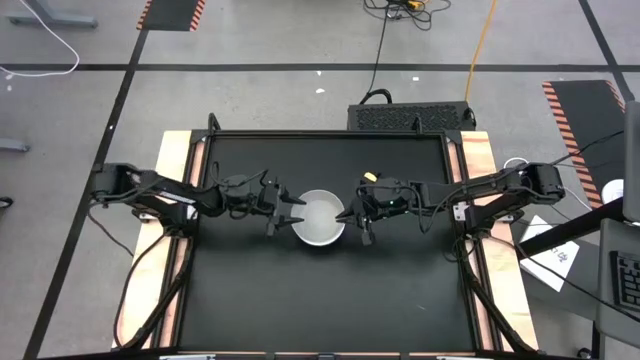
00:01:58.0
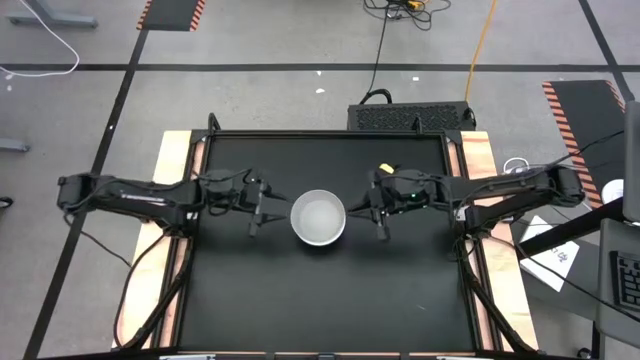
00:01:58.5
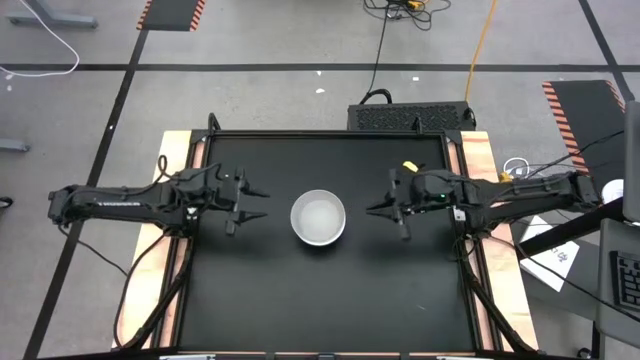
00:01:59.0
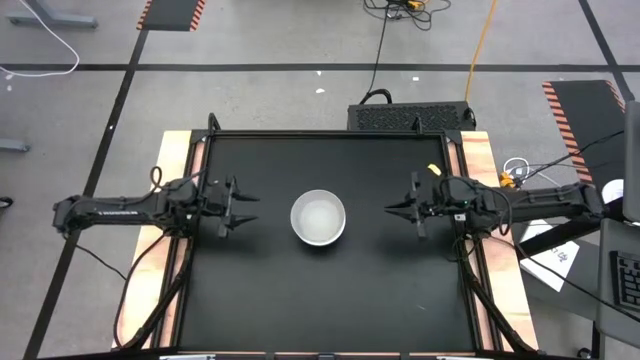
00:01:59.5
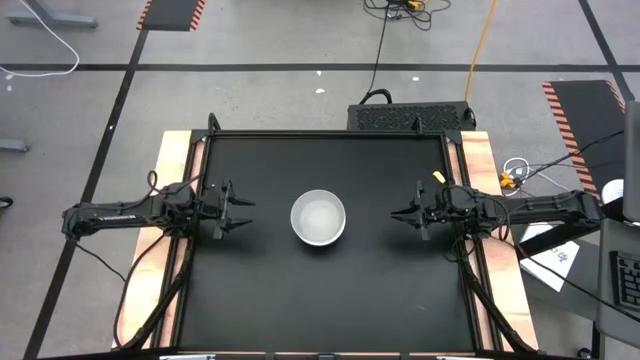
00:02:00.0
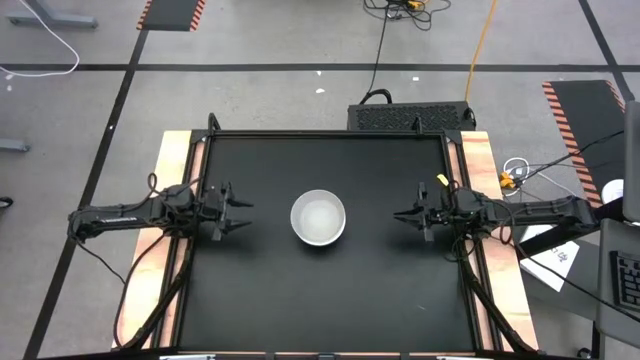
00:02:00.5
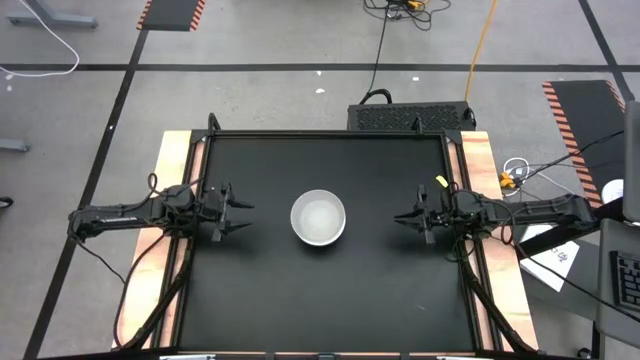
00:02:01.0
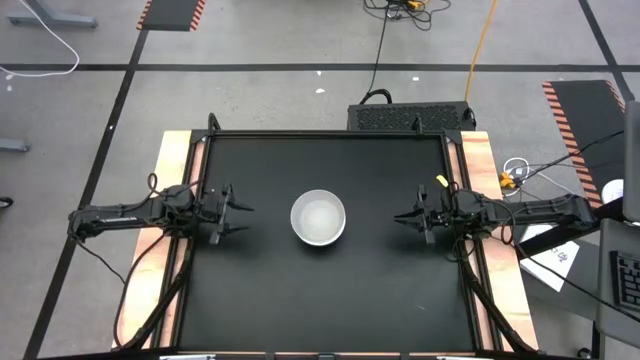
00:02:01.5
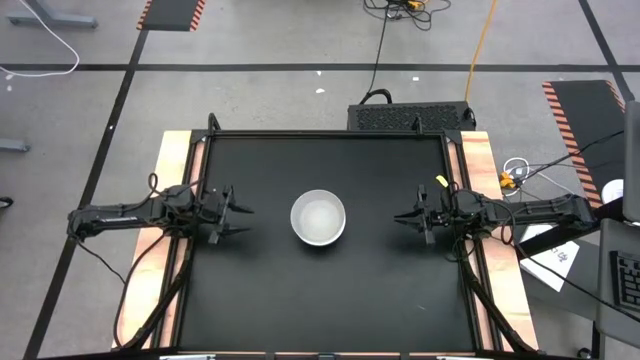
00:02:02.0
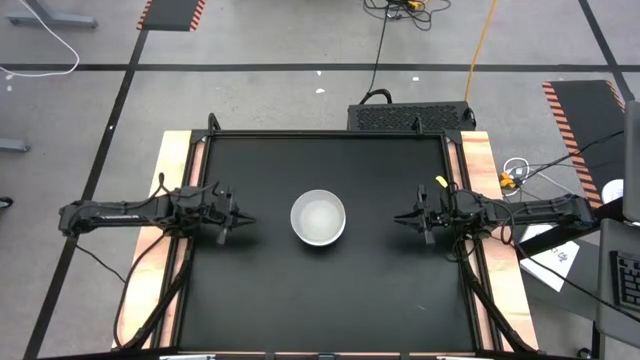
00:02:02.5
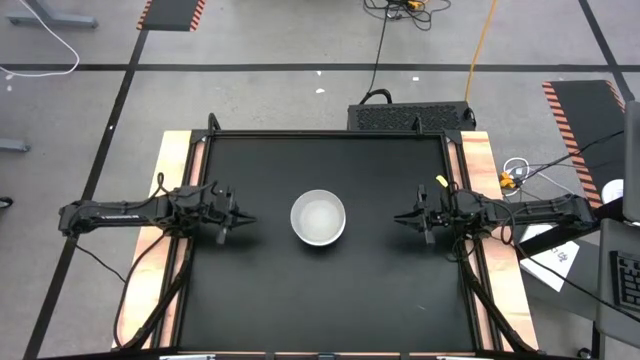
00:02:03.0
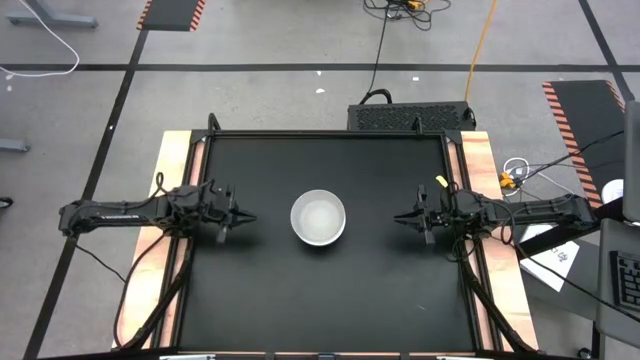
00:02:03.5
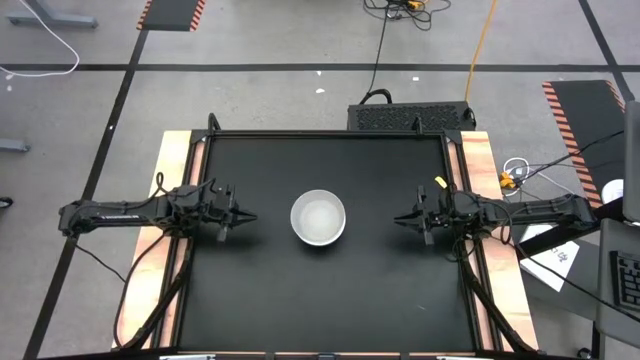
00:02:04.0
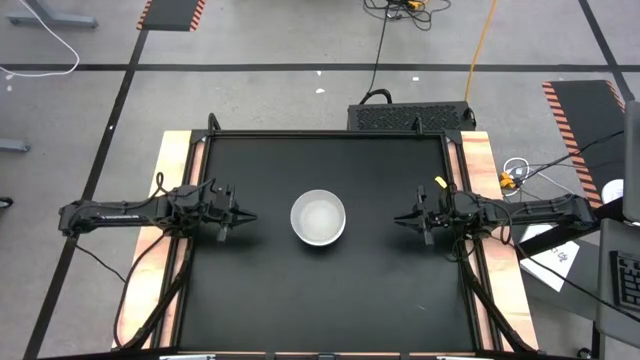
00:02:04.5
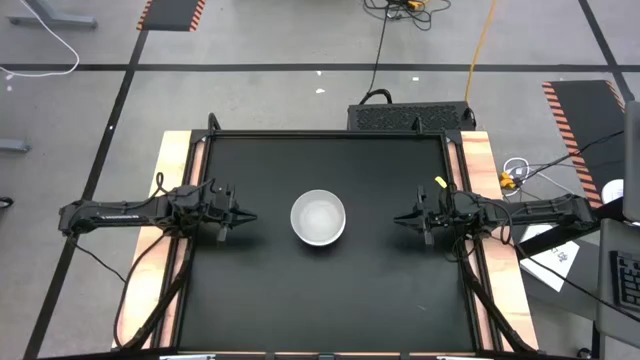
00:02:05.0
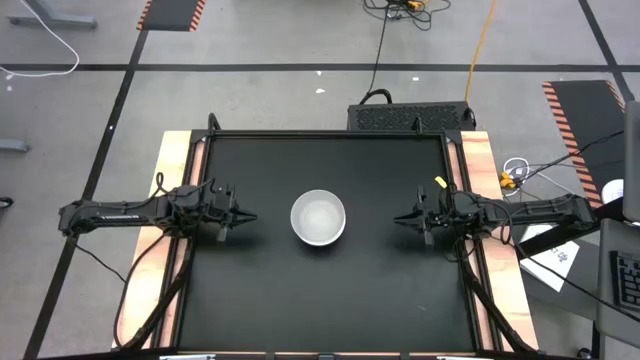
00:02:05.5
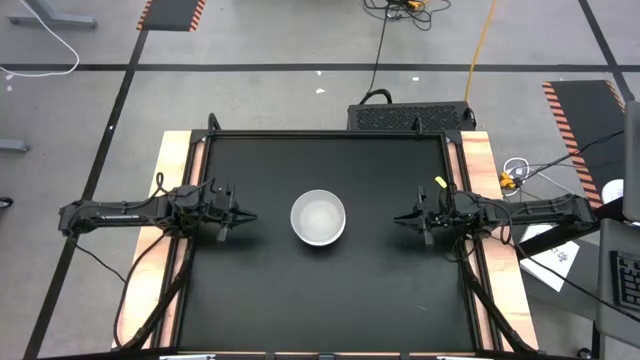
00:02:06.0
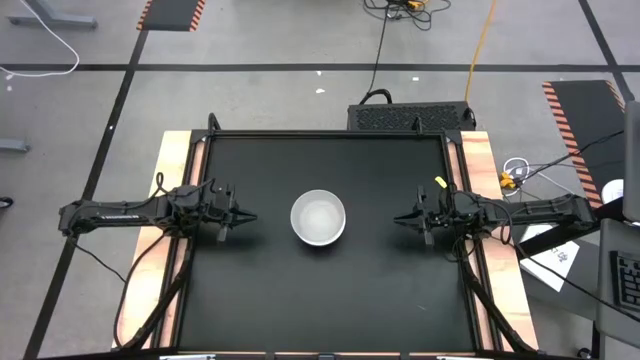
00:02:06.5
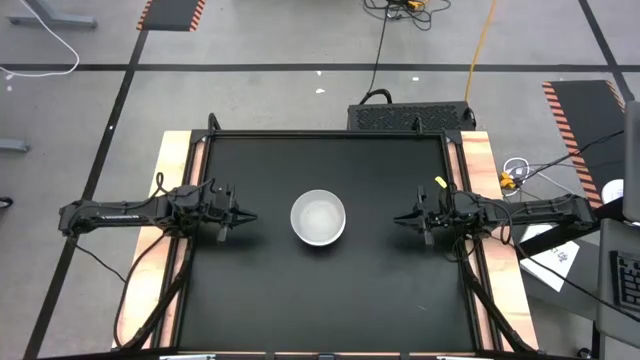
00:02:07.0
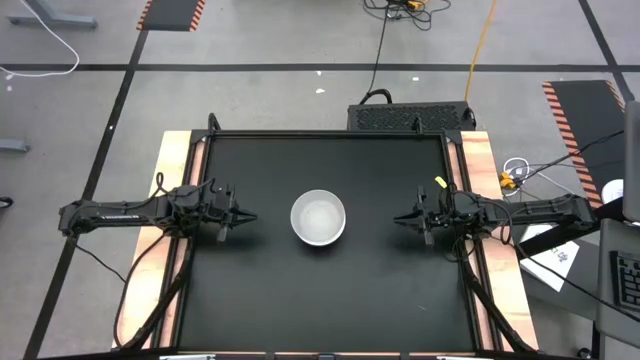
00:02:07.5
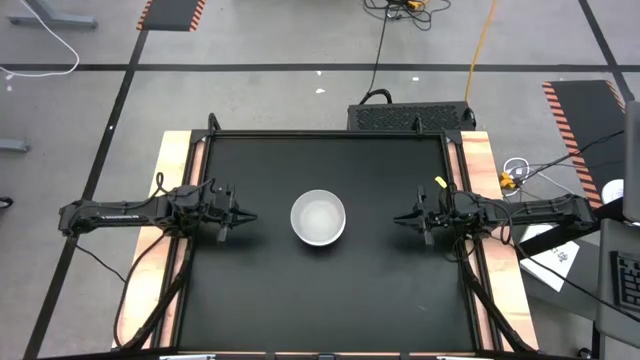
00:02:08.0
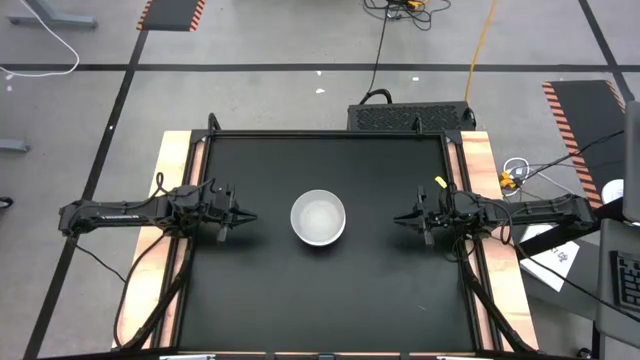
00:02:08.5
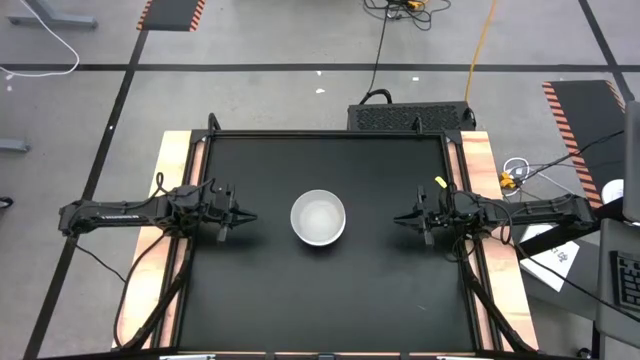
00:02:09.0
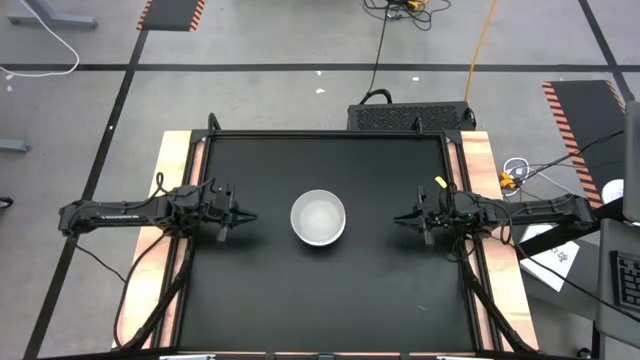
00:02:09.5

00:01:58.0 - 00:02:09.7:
Task: Nest bowls inside each other
Return to Home Position

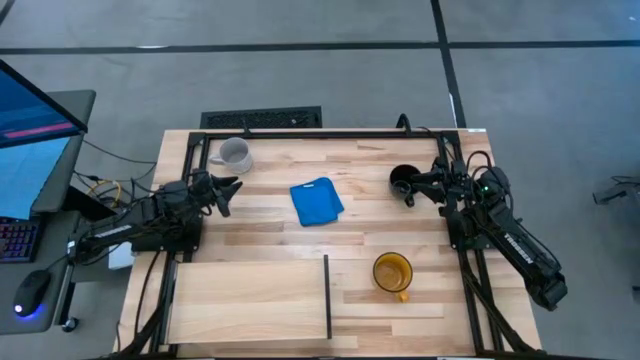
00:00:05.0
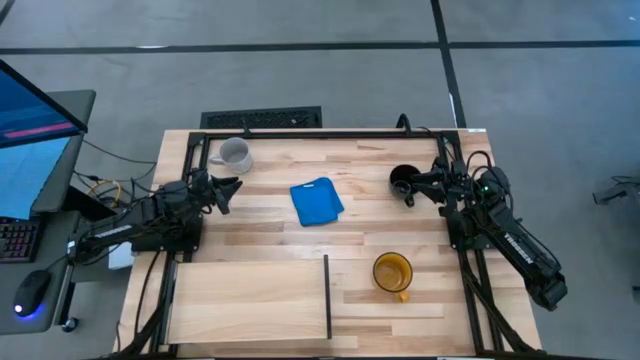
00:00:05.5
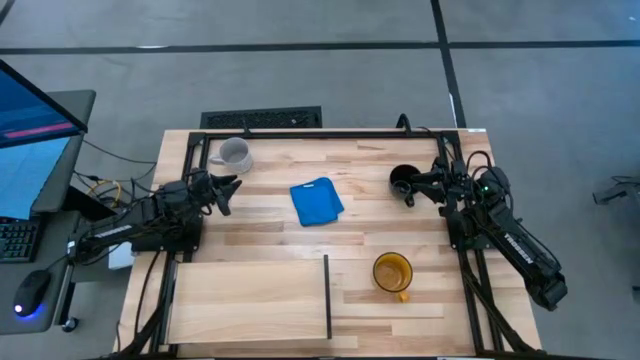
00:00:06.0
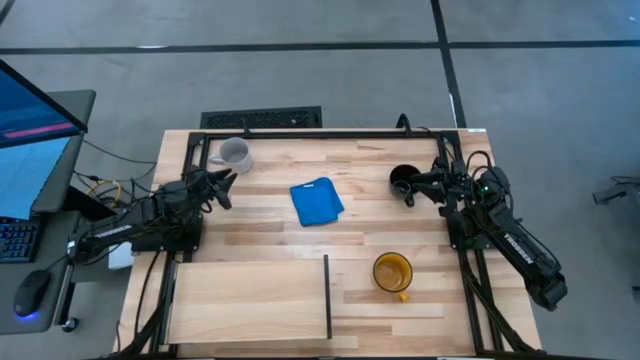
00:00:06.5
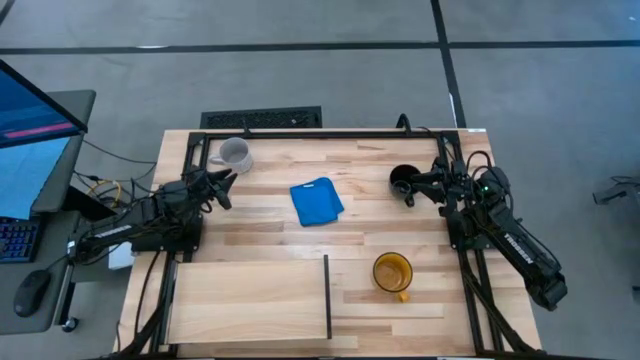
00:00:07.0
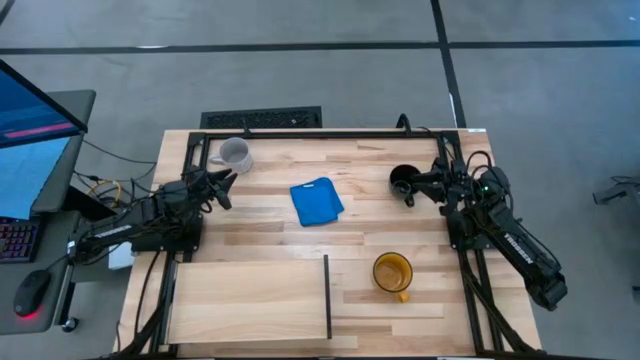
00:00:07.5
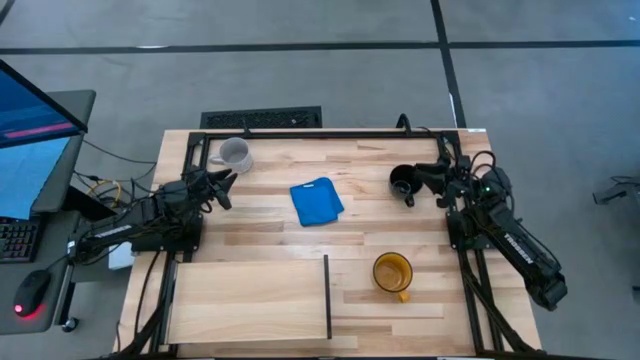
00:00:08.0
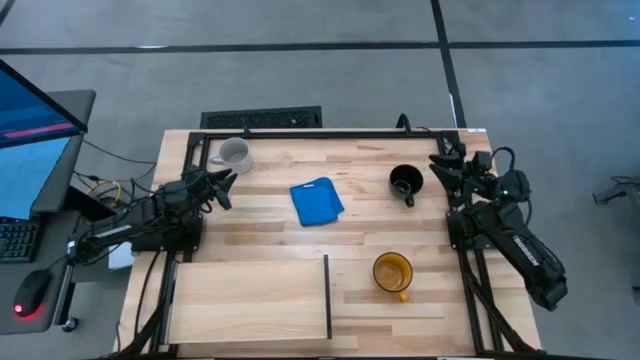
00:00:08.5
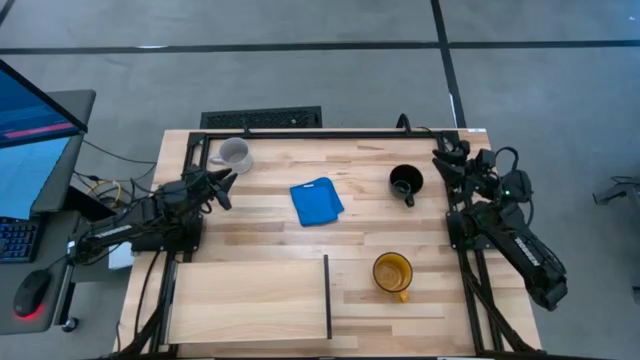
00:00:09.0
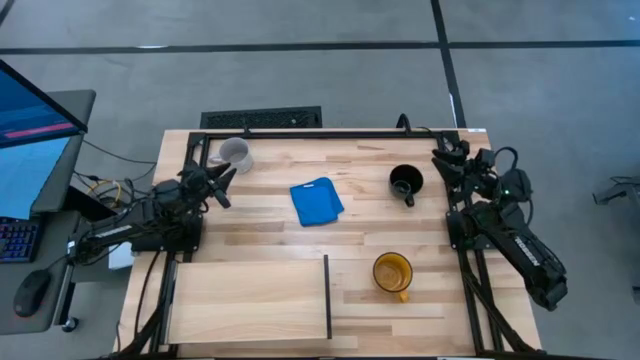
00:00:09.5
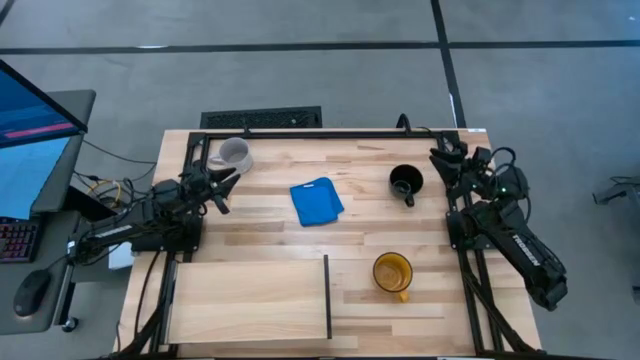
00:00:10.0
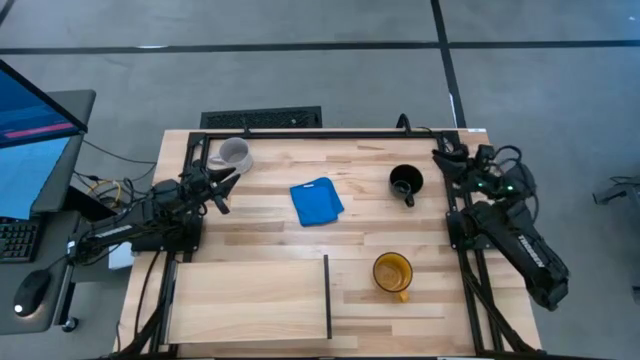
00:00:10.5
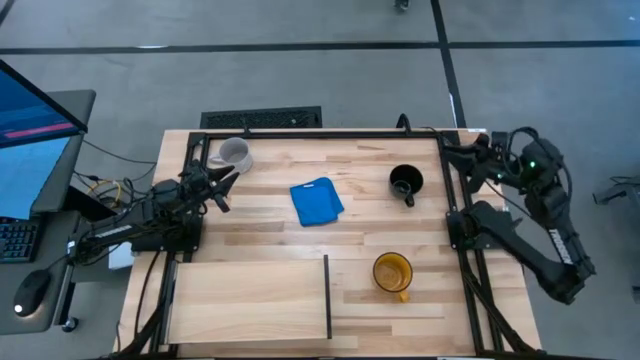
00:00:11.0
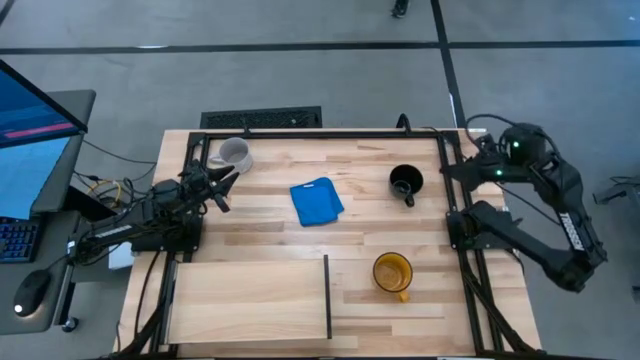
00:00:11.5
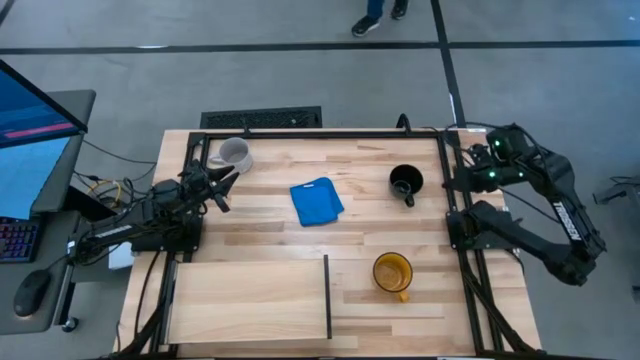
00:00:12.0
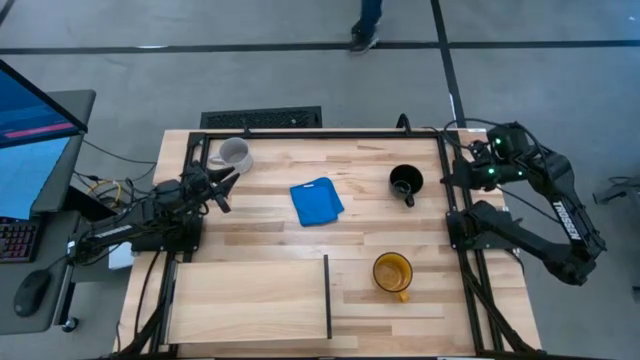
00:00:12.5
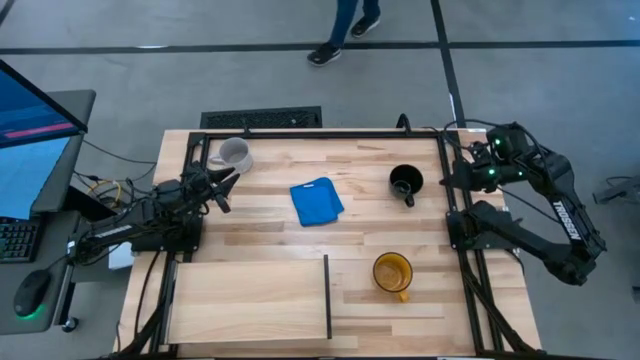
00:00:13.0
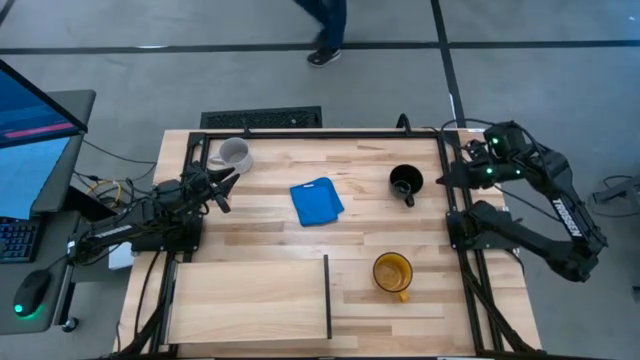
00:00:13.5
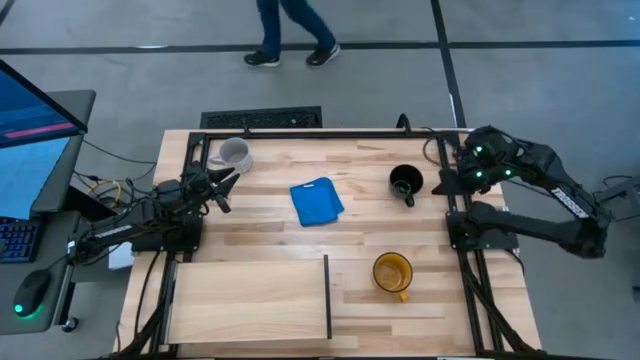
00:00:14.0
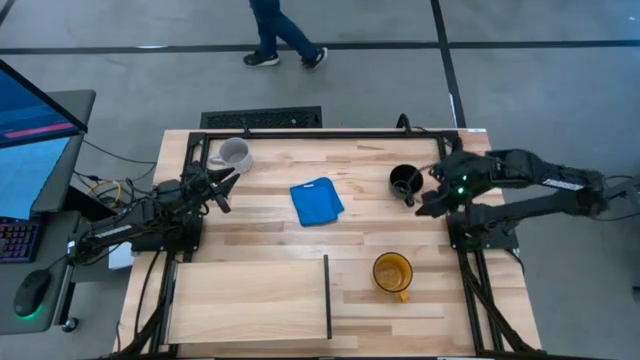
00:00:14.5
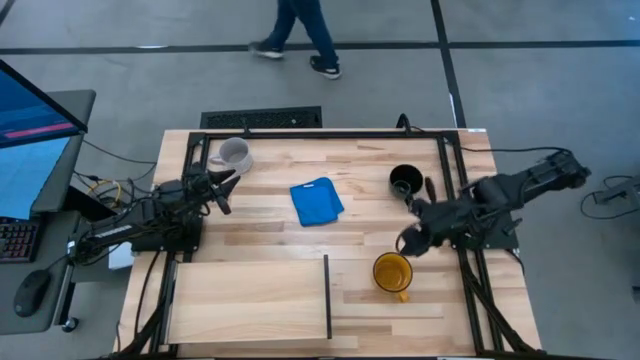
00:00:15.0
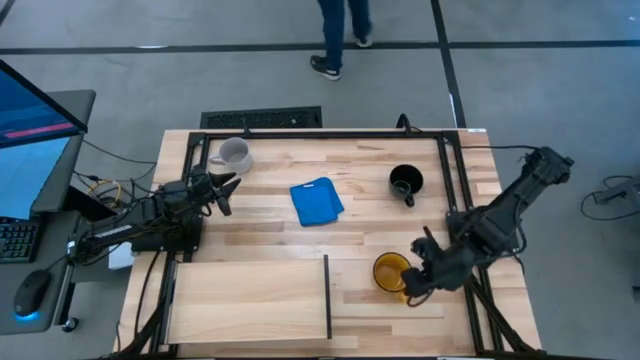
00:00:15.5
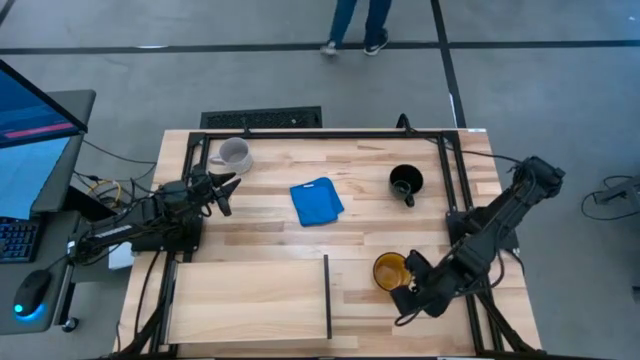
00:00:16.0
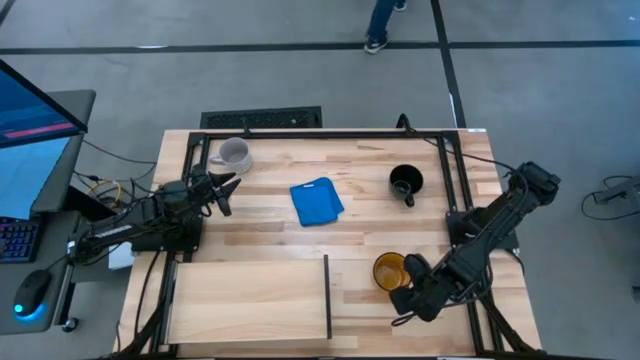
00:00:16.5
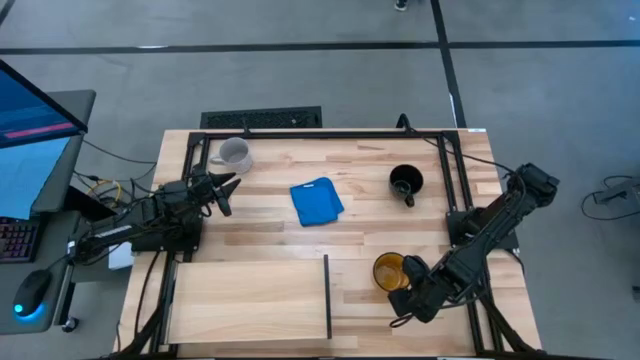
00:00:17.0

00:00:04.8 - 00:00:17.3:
Task: Stack small to large cups/mugs on shelf
Put the yellow mug on the shelf
